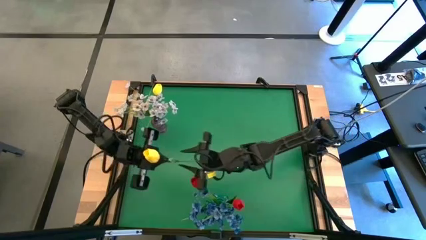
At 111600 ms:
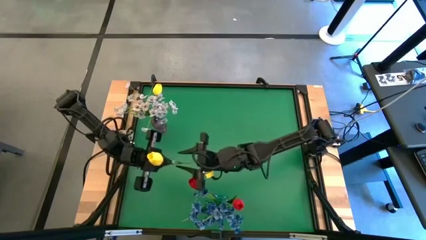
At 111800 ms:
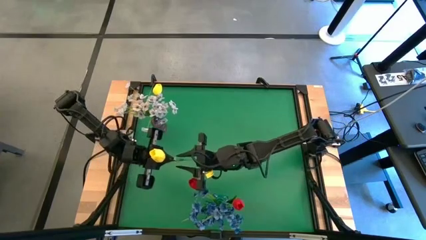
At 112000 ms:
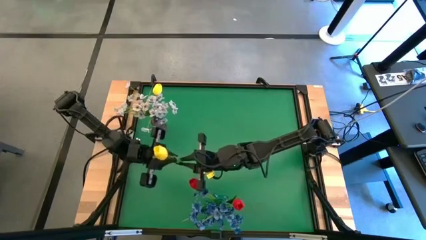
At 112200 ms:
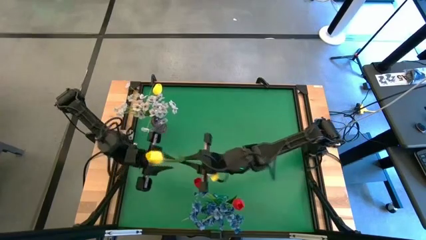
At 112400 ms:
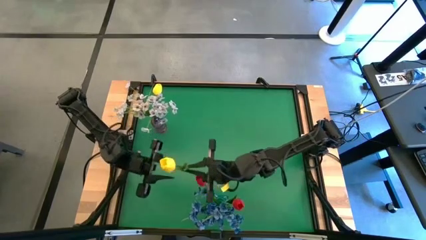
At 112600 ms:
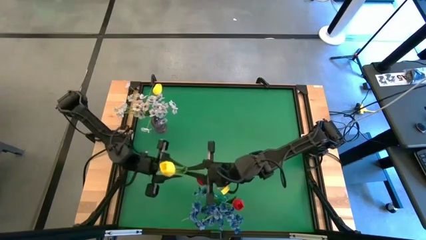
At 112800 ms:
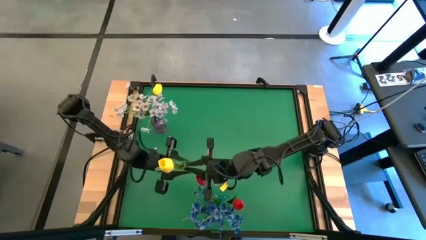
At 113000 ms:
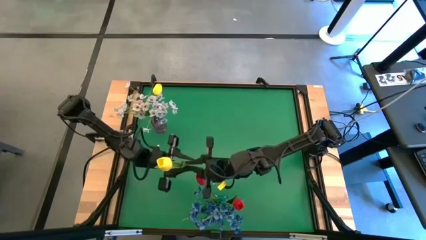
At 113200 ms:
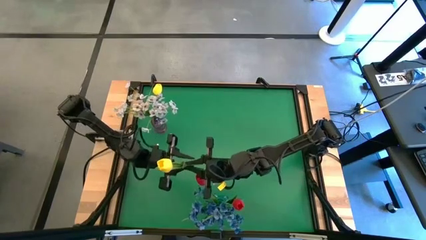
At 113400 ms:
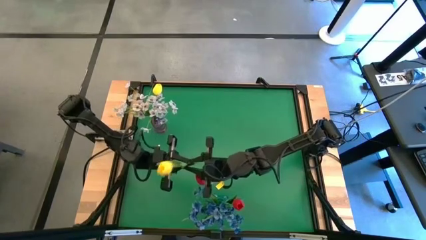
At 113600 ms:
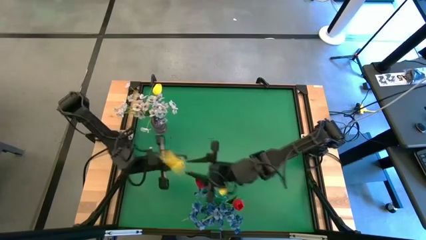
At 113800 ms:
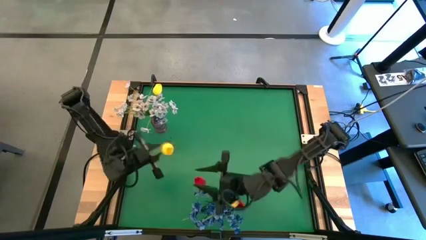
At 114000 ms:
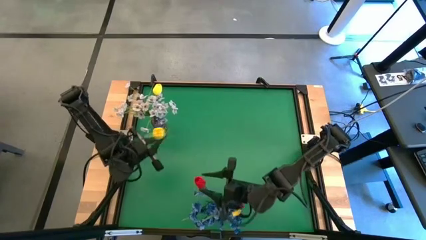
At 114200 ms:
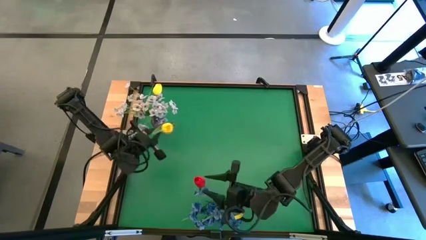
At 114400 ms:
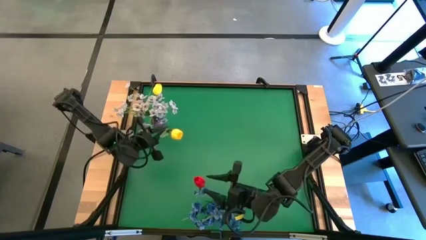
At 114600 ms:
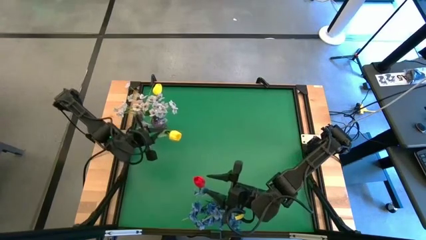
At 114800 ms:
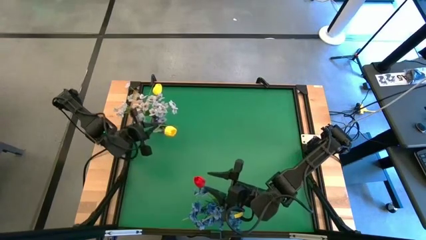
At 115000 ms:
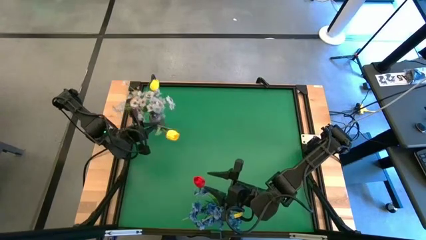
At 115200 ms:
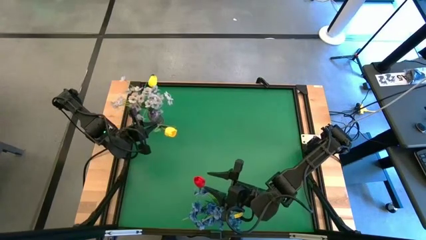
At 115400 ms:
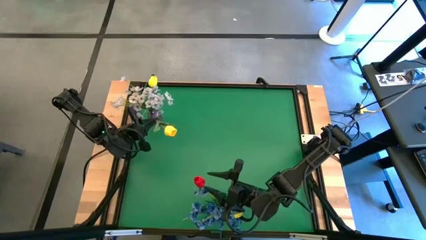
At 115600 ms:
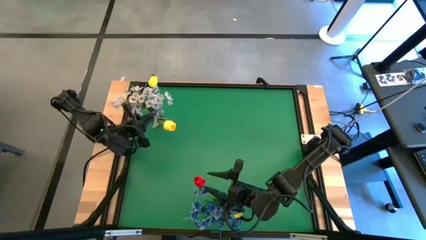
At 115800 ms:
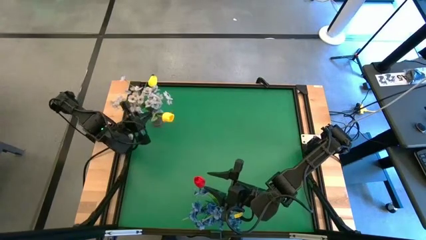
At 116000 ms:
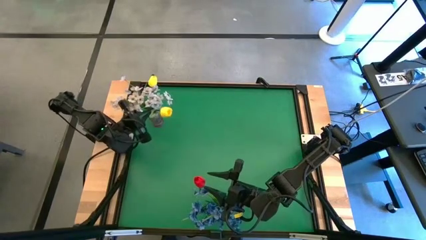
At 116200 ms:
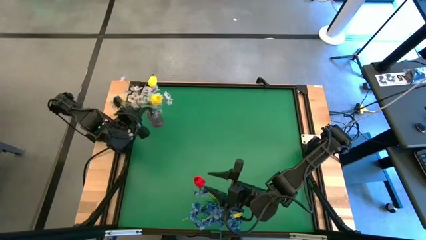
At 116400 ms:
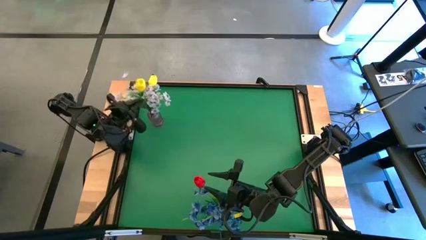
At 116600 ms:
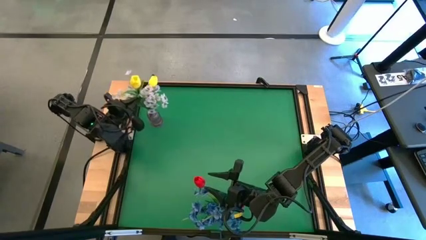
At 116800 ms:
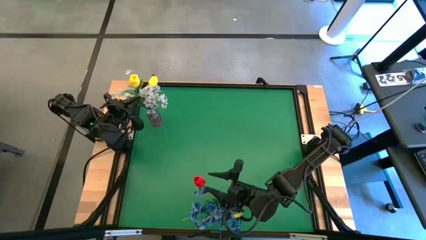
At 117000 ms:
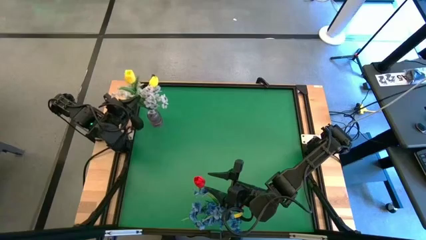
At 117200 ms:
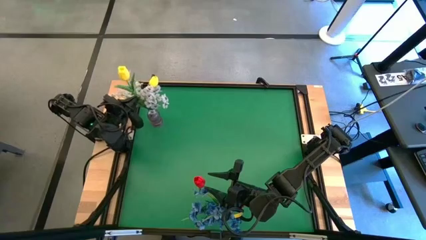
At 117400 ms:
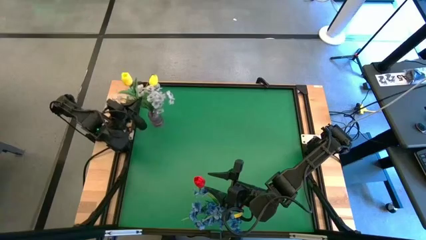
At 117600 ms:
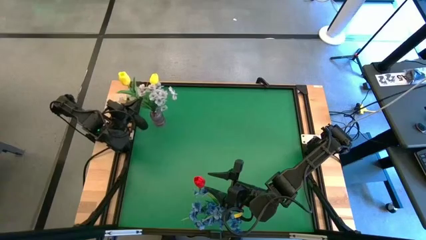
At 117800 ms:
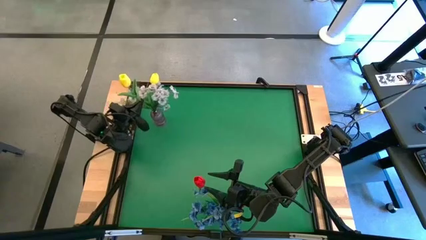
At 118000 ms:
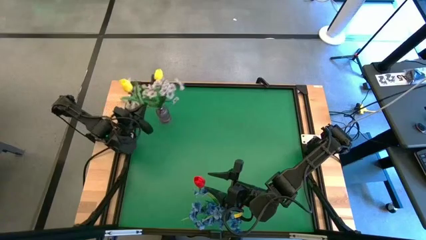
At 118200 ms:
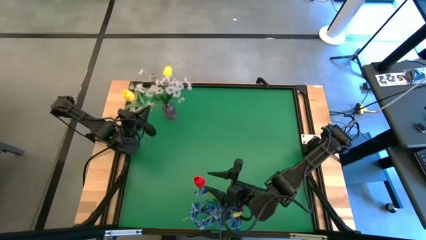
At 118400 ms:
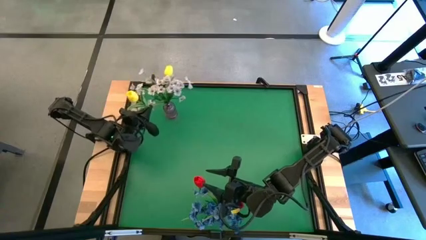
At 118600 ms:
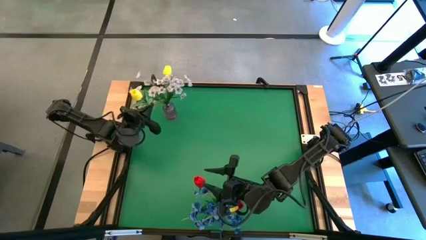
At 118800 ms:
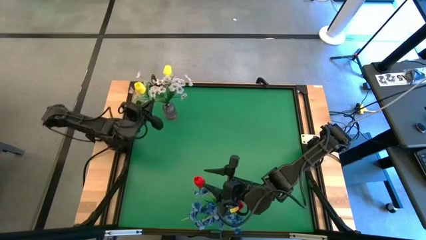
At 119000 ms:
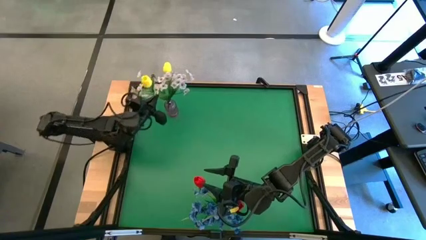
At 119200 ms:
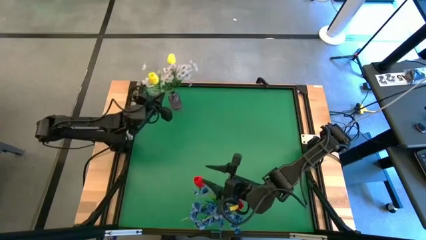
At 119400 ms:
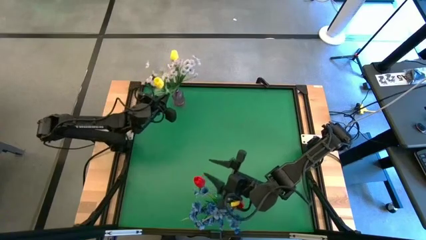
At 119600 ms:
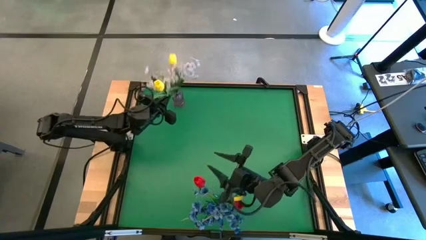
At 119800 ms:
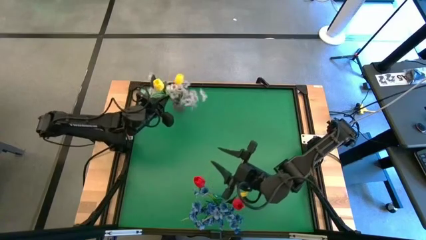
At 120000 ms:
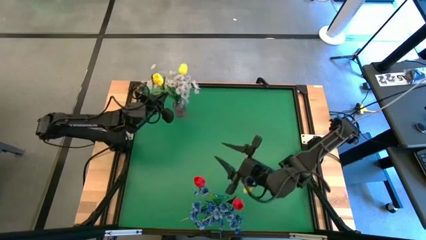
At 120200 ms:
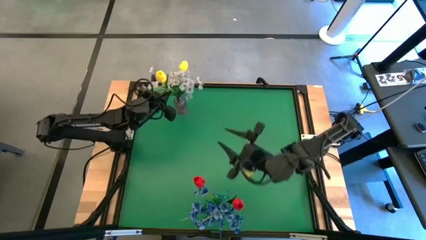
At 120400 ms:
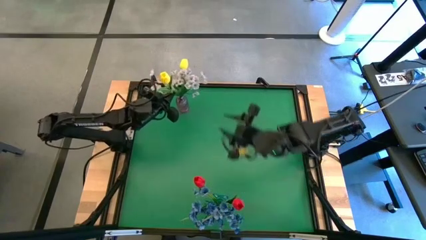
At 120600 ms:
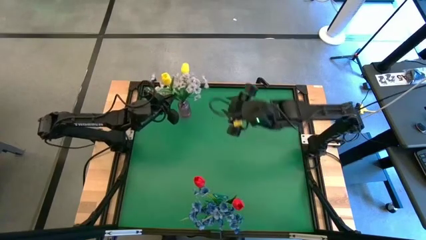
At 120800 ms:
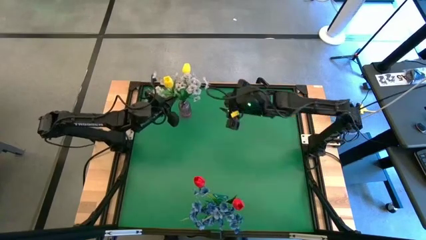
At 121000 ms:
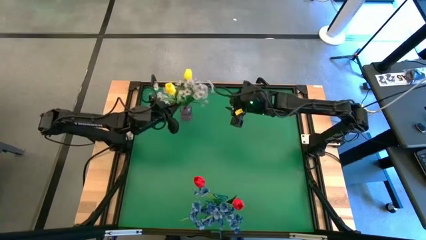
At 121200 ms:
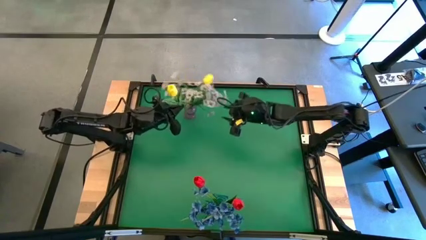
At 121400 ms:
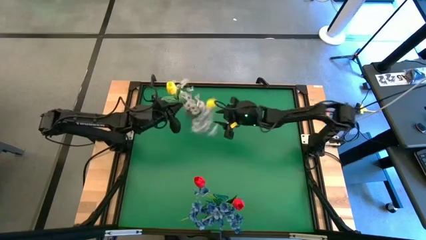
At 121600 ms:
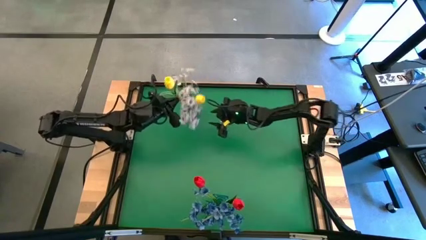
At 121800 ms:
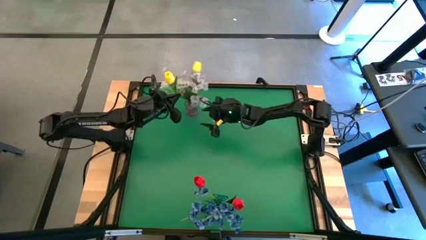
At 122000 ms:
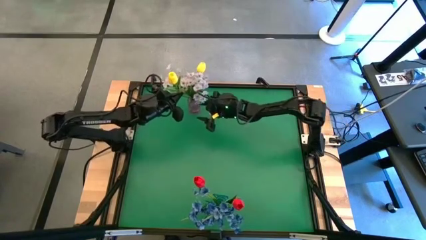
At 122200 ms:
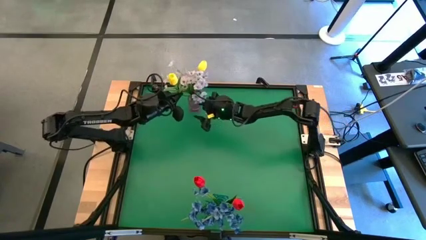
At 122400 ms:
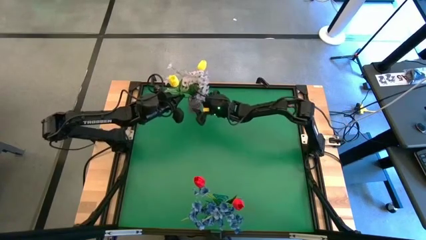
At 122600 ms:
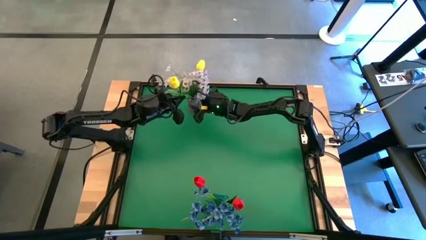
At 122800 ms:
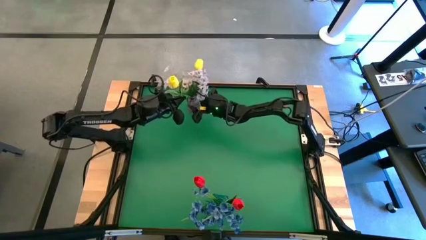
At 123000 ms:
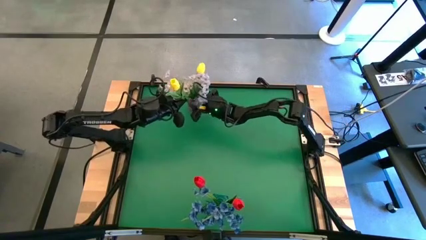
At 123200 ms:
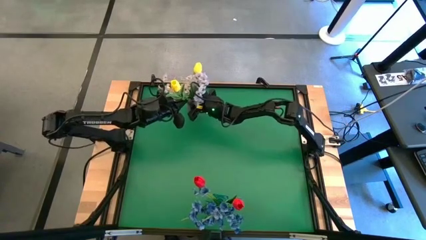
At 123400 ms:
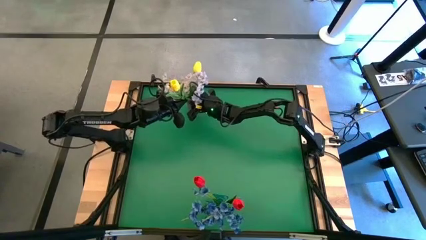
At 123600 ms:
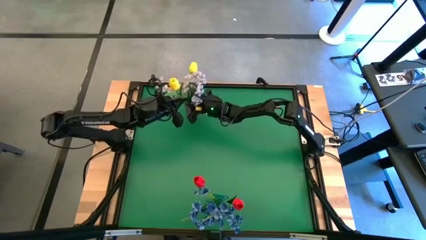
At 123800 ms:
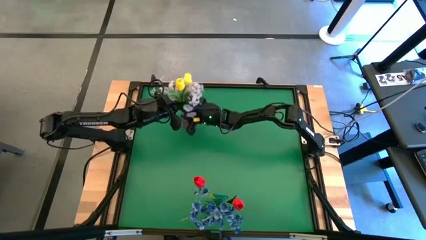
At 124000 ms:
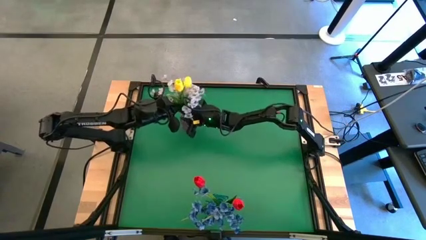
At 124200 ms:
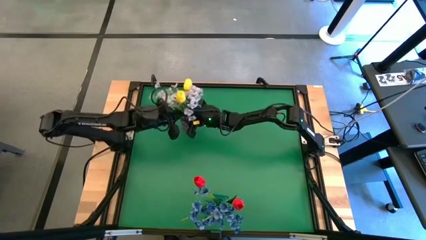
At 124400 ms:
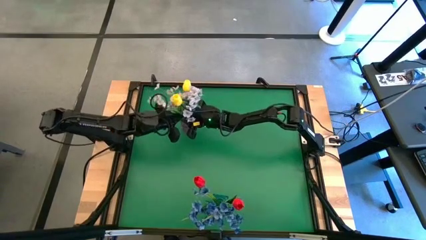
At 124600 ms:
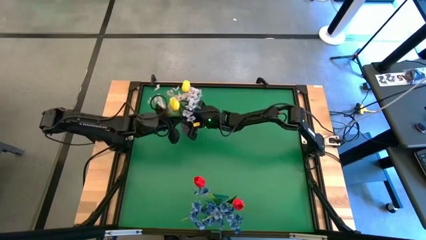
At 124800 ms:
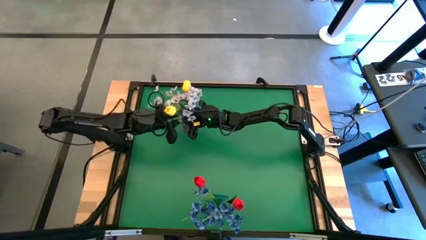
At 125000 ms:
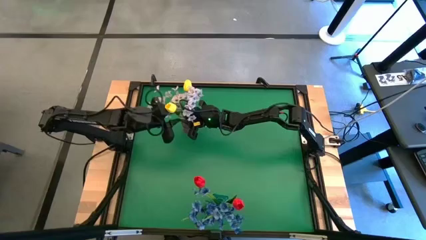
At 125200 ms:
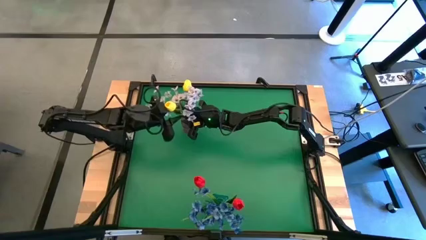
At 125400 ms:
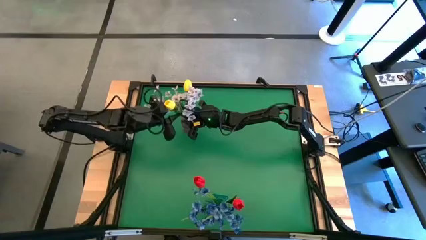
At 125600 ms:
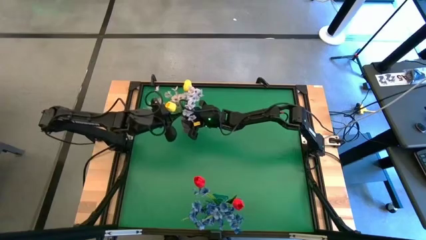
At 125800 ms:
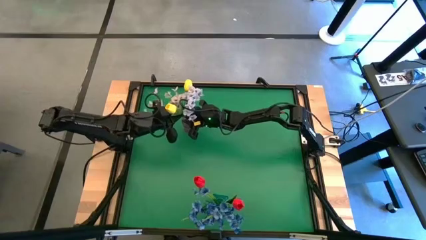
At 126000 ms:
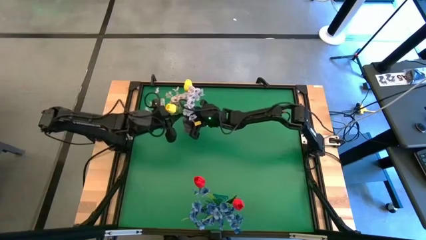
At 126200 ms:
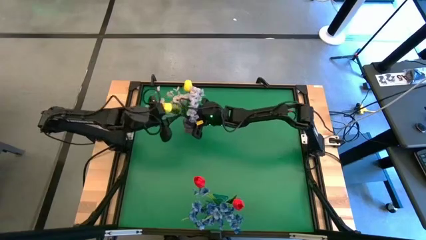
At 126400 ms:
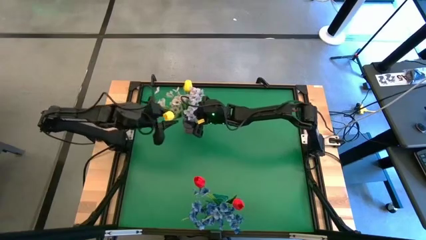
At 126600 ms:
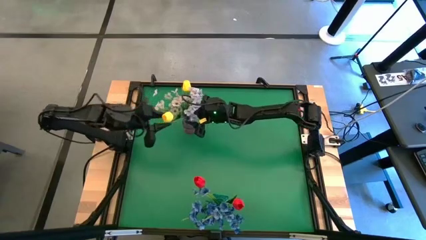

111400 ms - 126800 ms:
Task: Sort flowers into vase by color
Put the yellow flower into the purple vase
